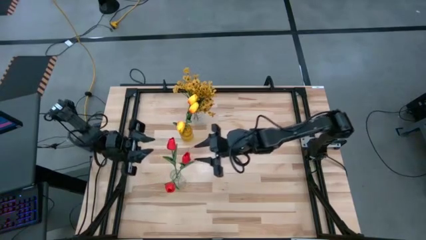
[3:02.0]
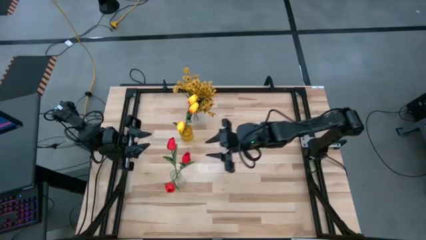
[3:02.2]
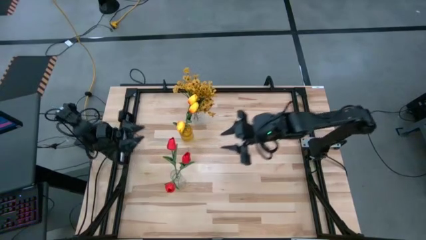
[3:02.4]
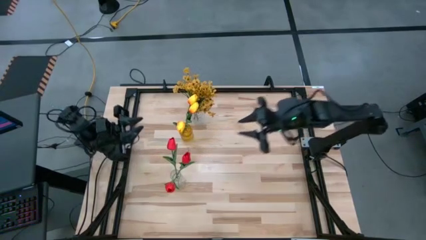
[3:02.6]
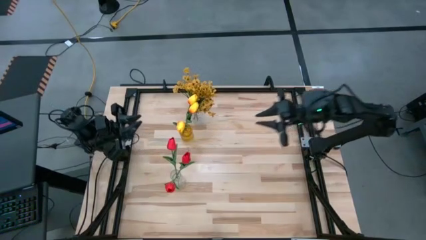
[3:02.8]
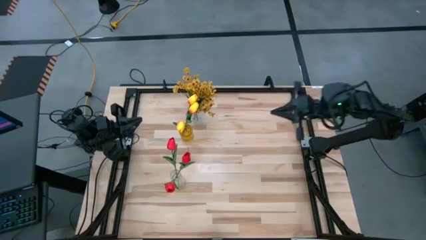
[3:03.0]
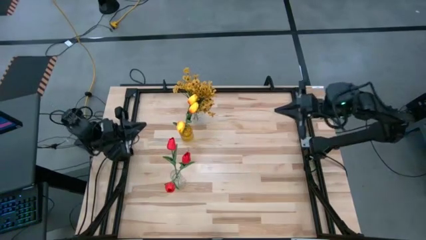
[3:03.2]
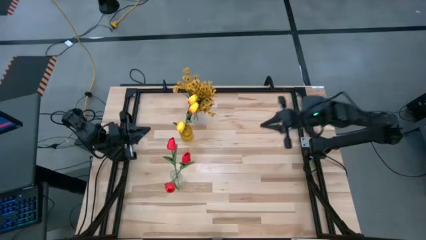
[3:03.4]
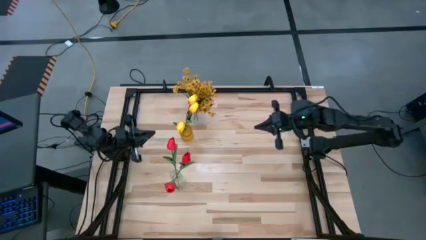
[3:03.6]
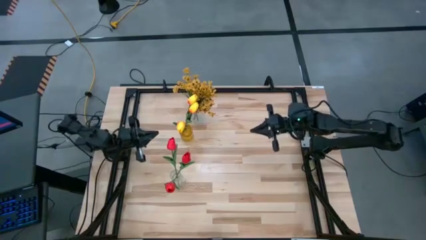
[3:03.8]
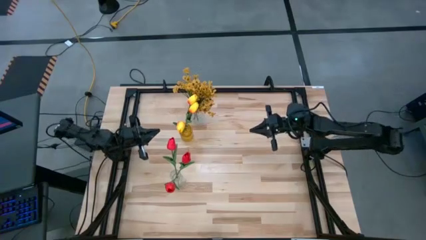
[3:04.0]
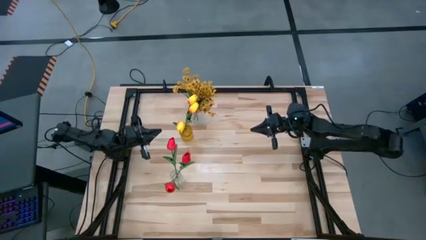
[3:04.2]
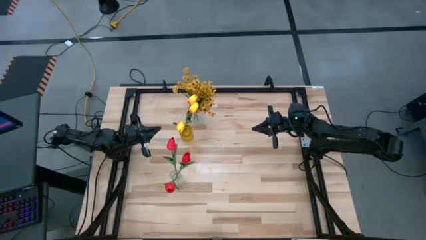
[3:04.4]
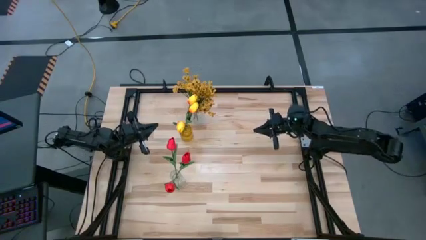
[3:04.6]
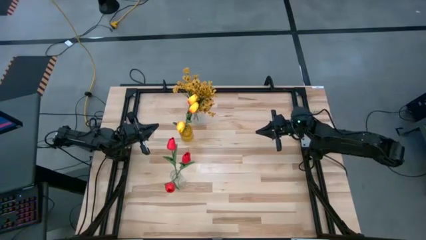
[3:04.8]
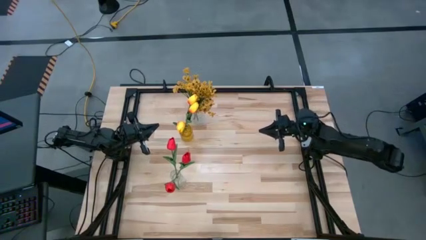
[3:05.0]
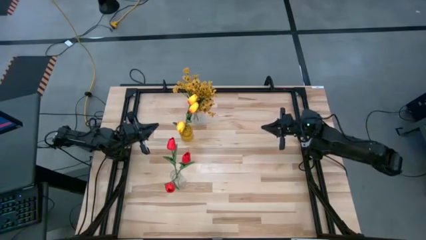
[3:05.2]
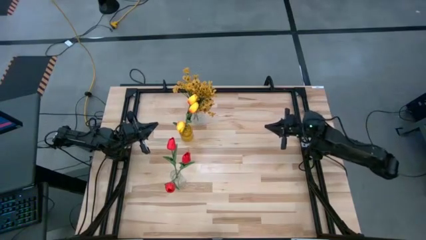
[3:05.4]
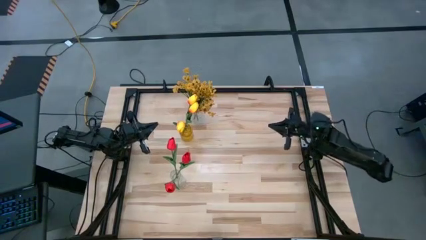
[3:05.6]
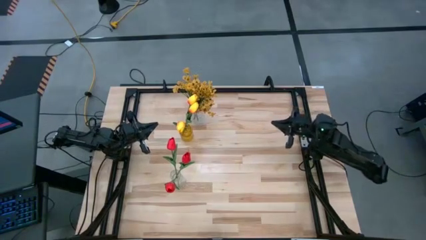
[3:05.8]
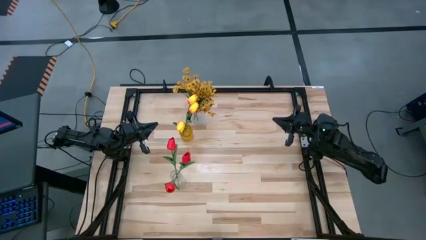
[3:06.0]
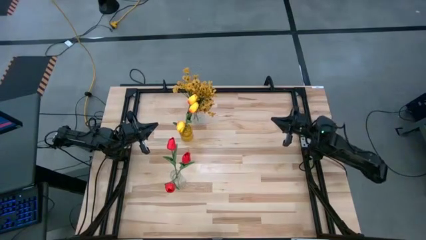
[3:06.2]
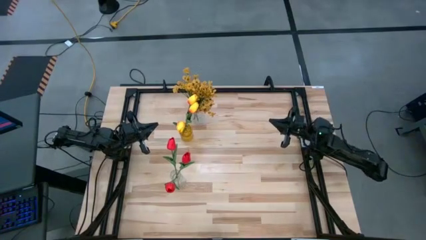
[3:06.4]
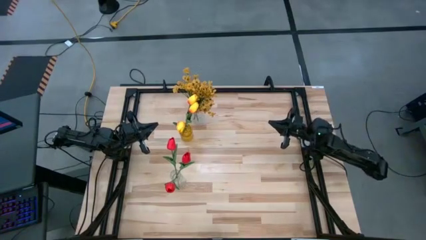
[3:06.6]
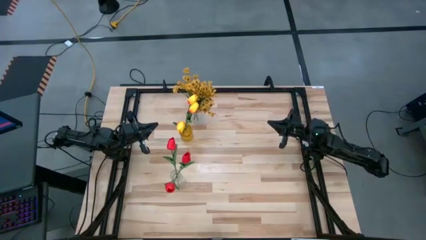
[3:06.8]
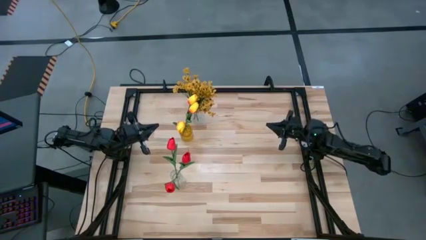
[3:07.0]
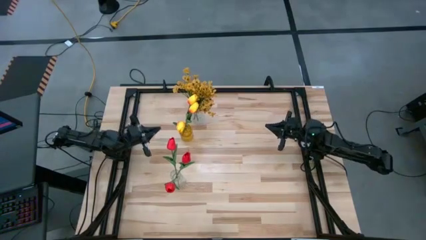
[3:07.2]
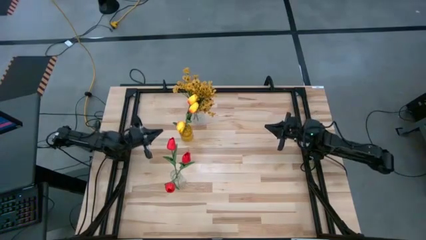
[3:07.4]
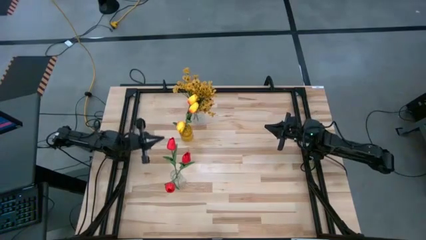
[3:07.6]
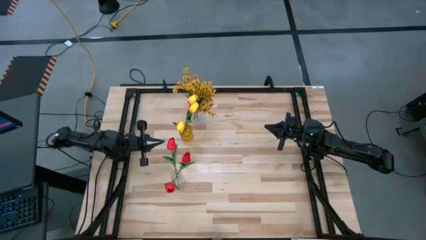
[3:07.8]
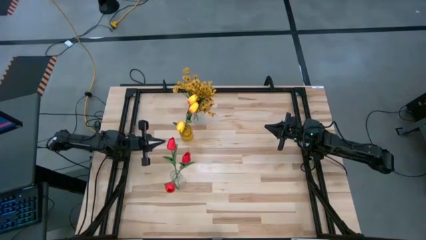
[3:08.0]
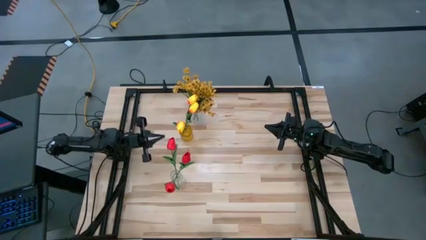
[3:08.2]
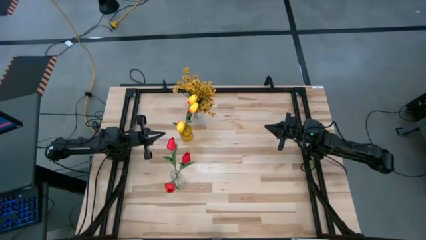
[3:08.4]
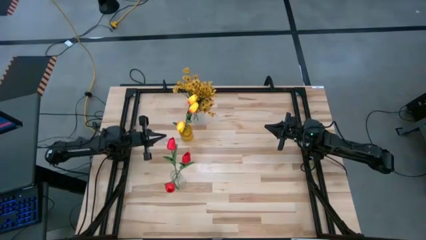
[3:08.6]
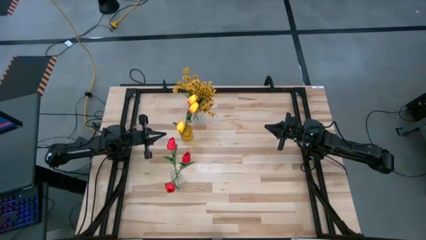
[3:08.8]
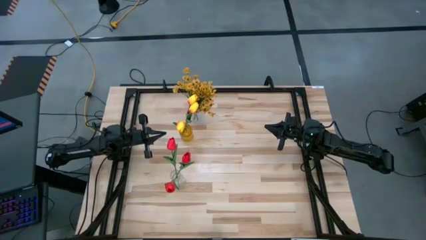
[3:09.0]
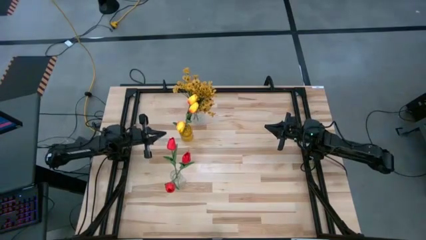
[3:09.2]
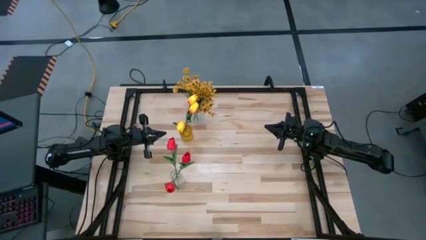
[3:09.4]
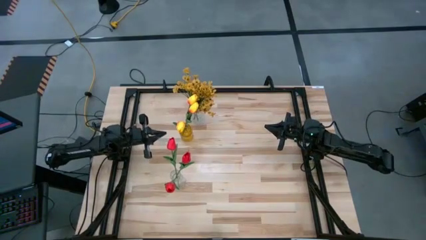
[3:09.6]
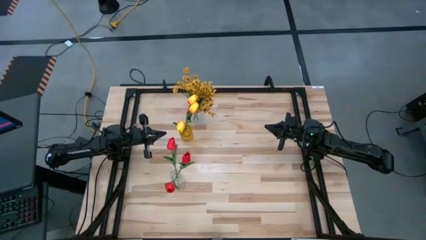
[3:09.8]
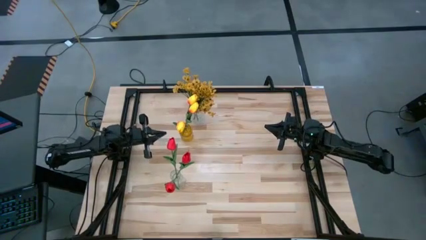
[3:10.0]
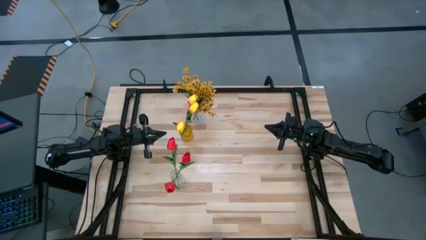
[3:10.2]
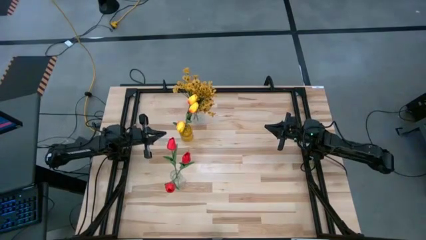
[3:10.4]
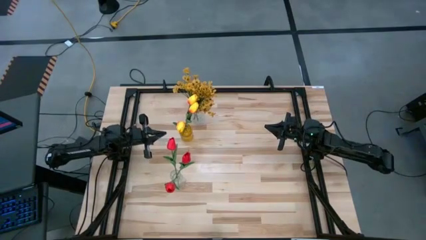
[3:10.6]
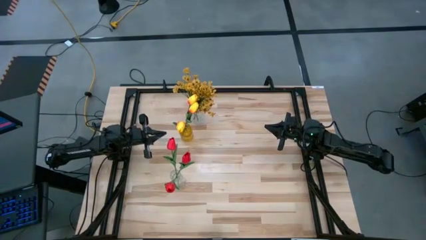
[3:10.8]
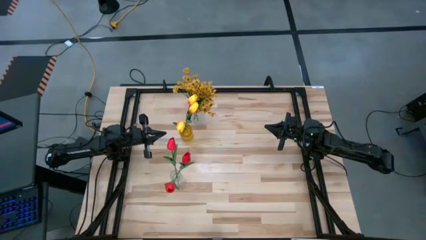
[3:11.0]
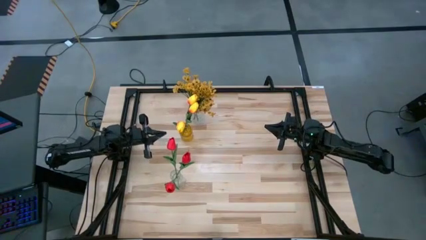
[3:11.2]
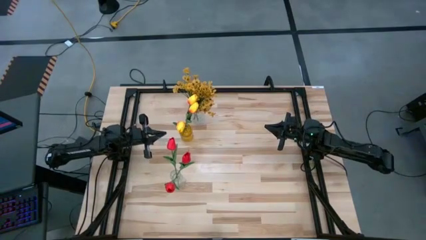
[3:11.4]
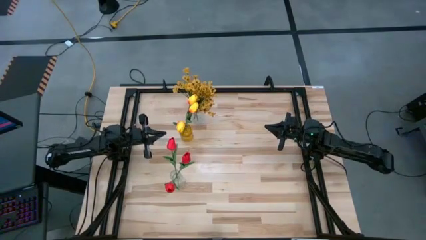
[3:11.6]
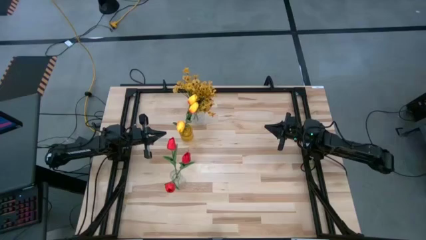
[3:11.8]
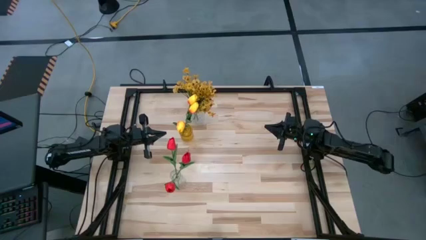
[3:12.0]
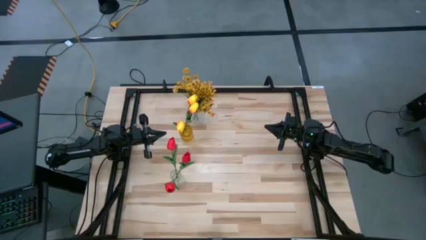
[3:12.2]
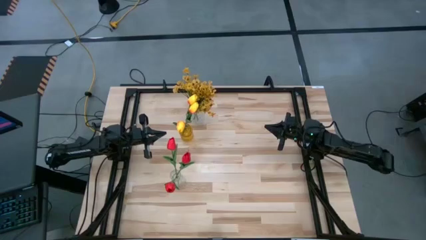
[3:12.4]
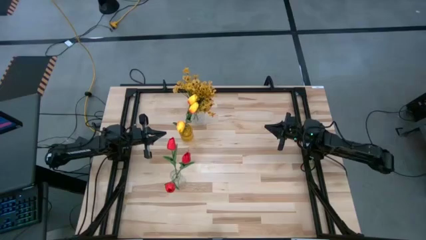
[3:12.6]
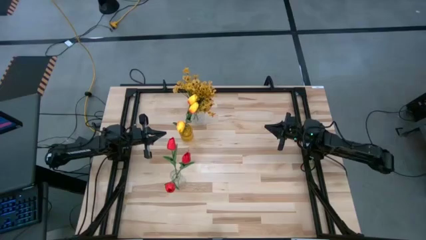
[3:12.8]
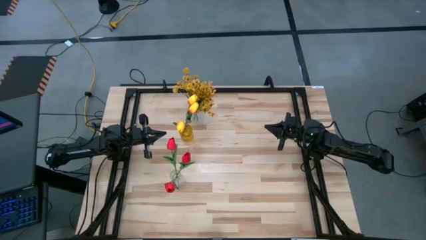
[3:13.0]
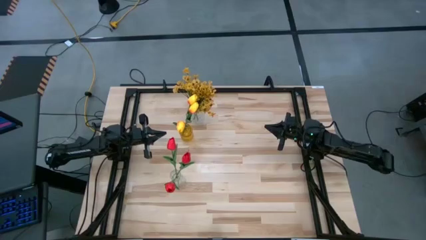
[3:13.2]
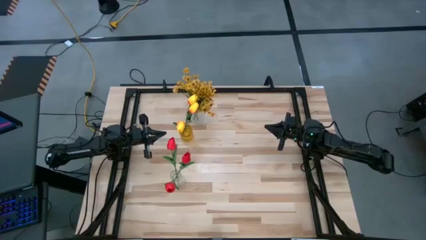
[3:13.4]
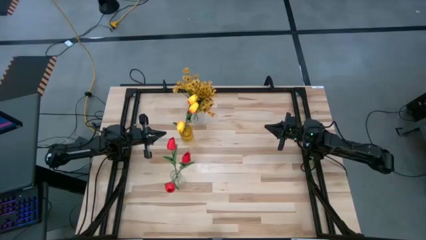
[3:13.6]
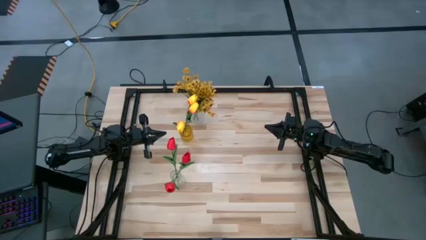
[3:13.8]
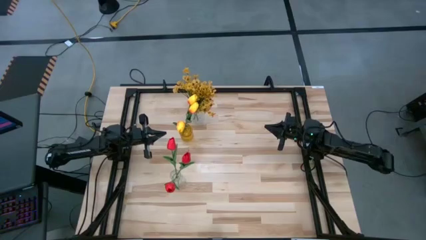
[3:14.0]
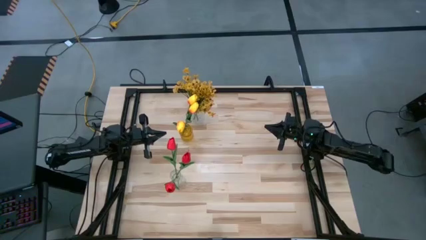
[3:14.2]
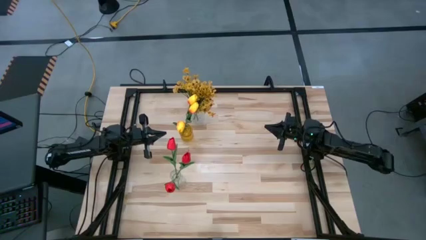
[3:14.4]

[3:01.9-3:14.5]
Task: Sort flowers into vase by color
Return to Home Position

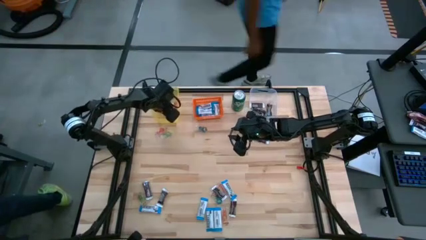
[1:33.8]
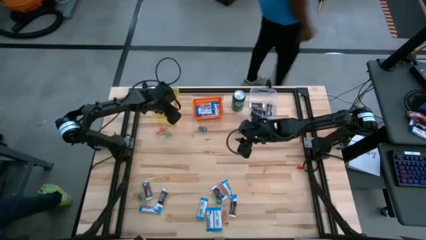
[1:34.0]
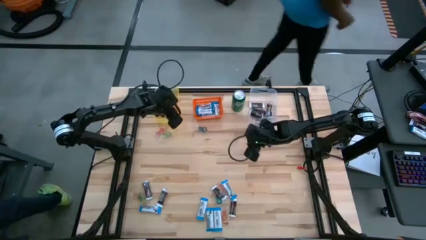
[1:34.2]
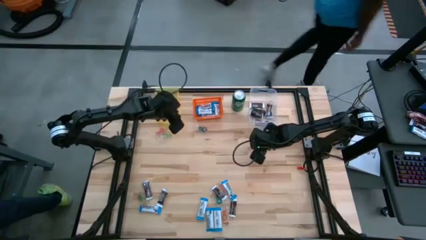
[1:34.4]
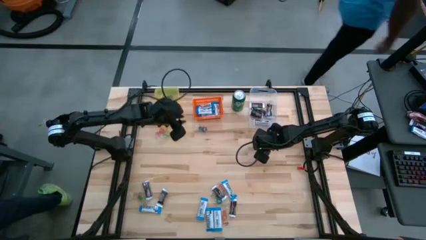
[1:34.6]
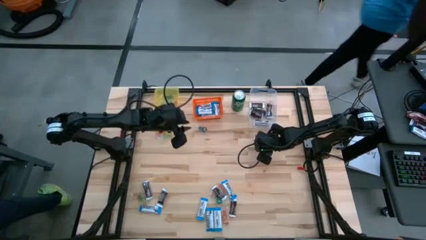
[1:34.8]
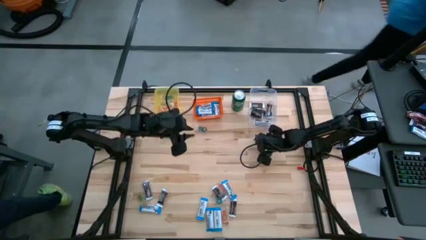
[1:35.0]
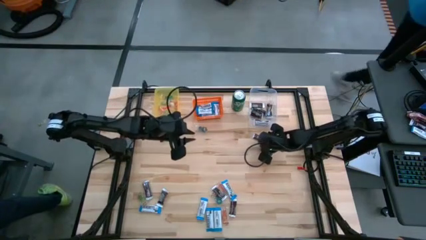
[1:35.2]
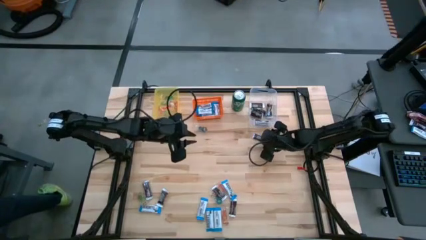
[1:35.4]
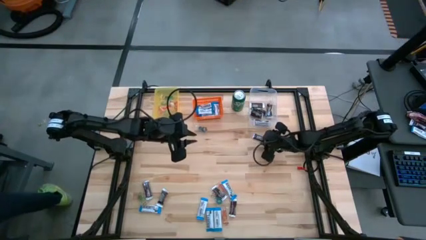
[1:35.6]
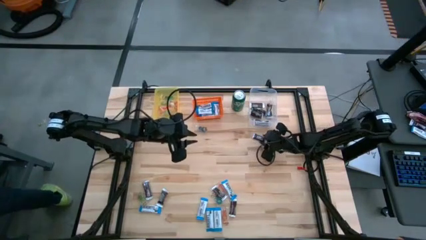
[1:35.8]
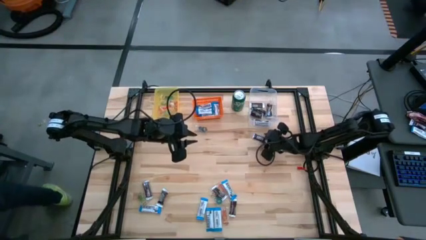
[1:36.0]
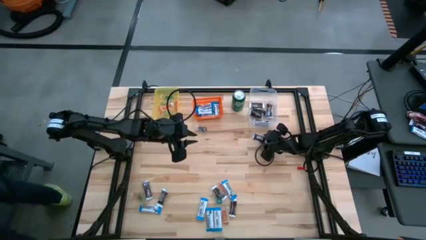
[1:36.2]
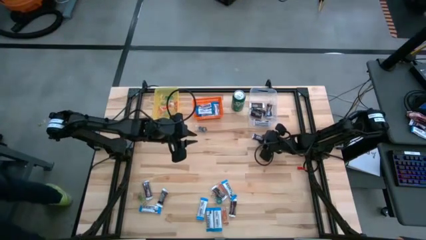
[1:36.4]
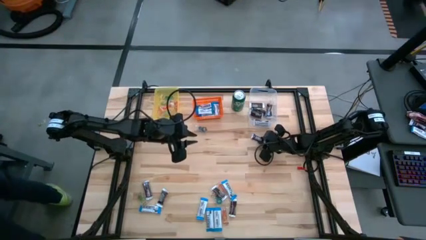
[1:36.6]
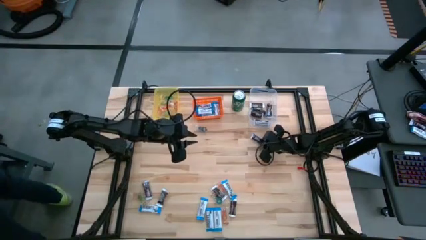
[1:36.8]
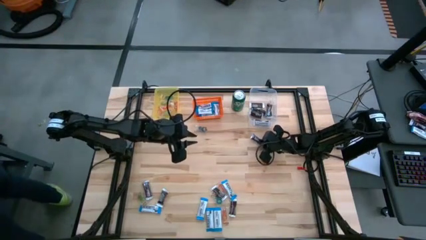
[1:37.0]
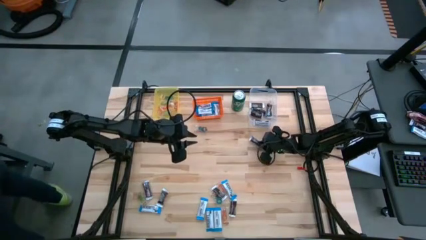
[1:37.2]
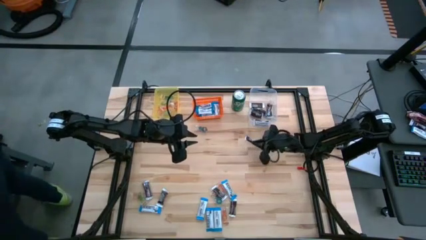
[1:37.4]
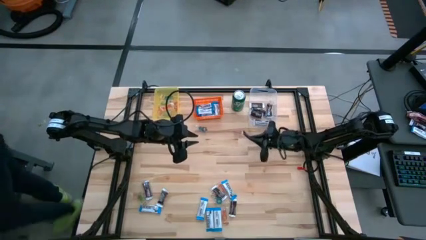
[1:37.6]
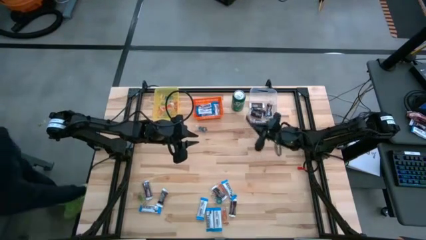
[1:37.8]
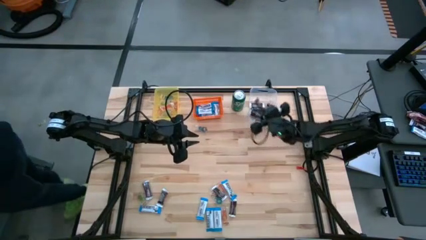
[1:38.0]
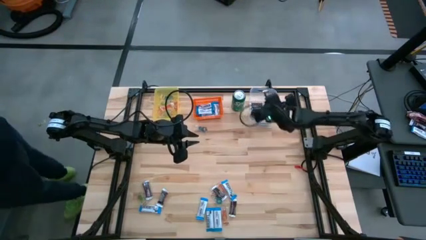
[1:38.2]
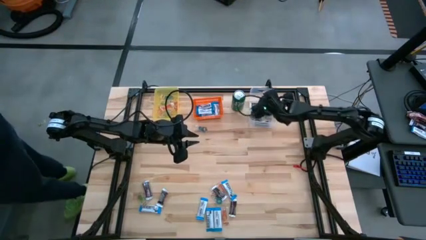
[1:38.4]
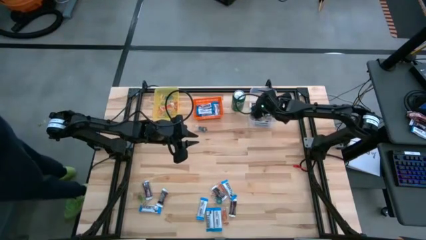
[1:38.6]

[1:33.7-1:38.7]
Task: Organize candy in baskets
Put the brown chocolate into the transparent bin
